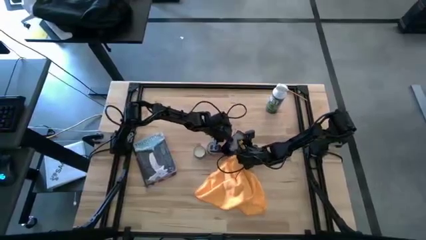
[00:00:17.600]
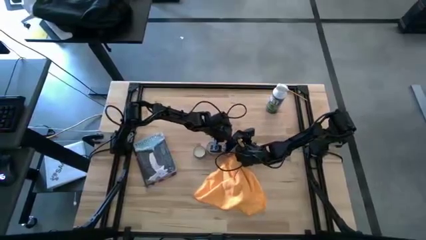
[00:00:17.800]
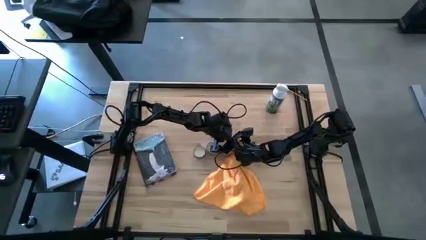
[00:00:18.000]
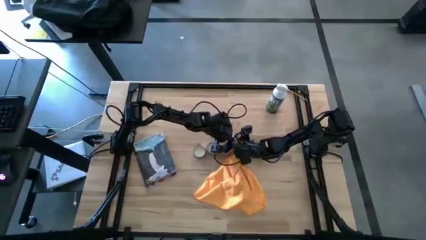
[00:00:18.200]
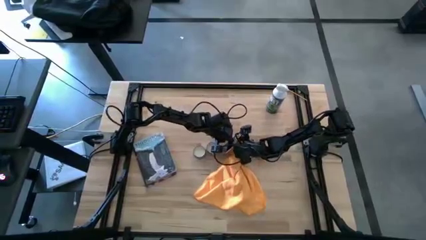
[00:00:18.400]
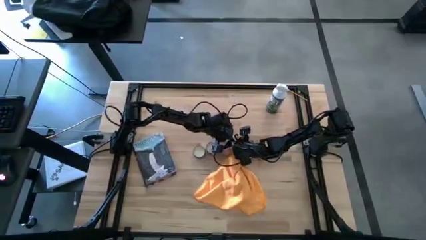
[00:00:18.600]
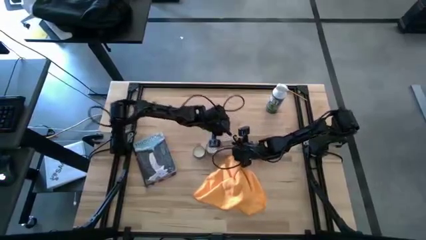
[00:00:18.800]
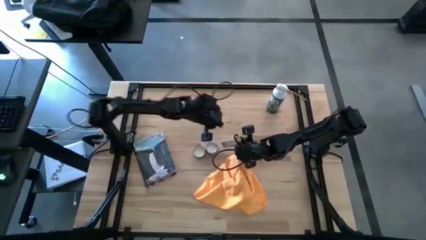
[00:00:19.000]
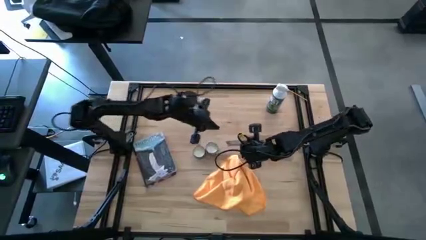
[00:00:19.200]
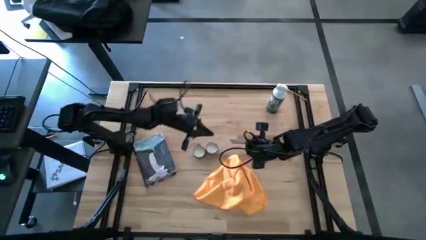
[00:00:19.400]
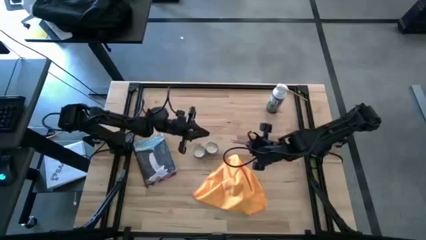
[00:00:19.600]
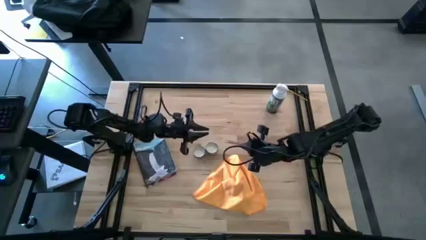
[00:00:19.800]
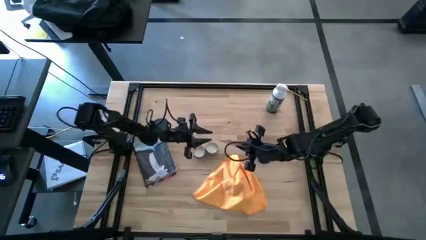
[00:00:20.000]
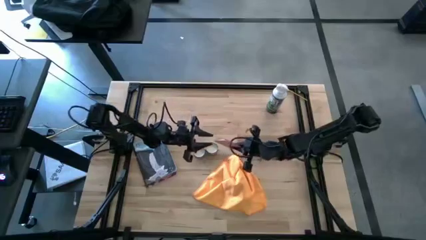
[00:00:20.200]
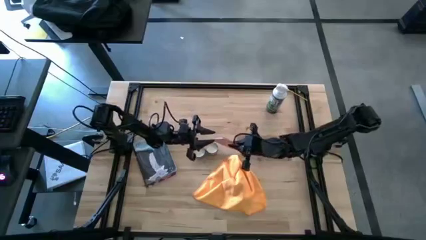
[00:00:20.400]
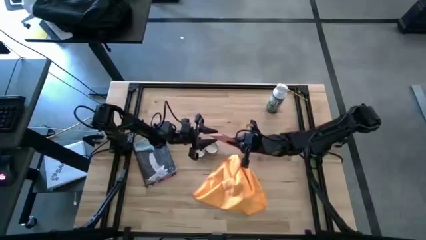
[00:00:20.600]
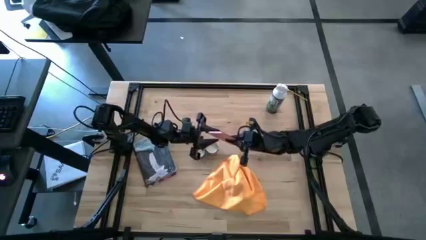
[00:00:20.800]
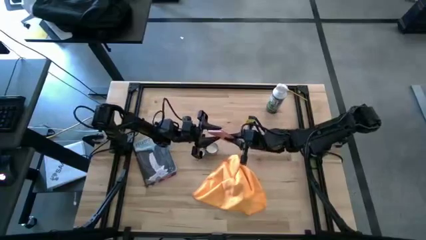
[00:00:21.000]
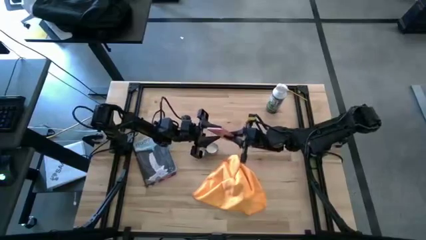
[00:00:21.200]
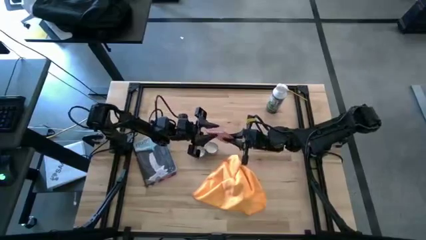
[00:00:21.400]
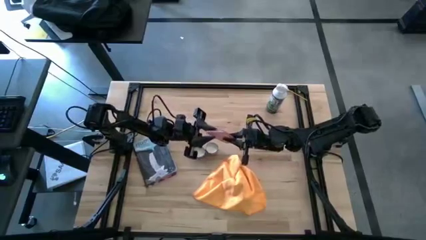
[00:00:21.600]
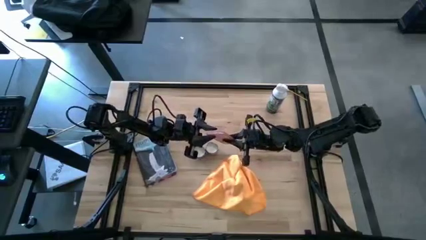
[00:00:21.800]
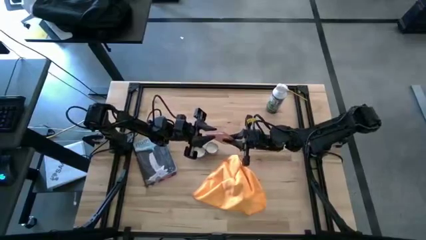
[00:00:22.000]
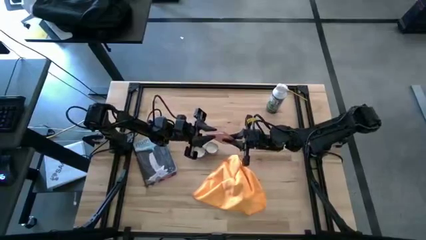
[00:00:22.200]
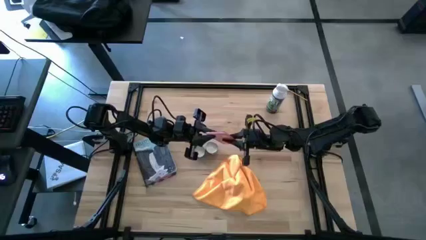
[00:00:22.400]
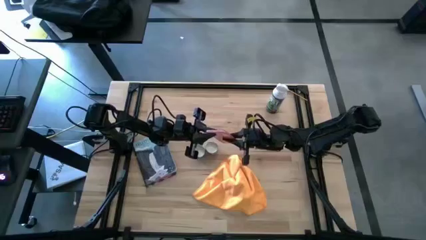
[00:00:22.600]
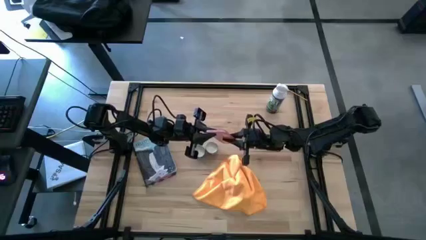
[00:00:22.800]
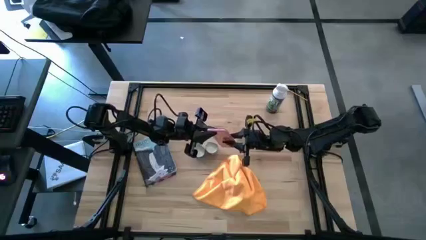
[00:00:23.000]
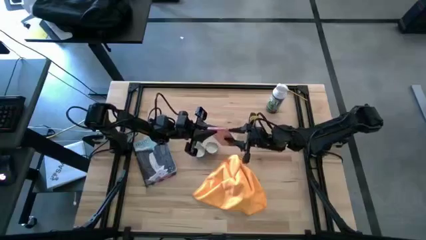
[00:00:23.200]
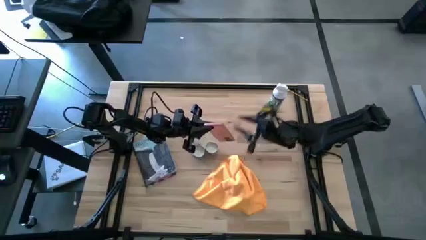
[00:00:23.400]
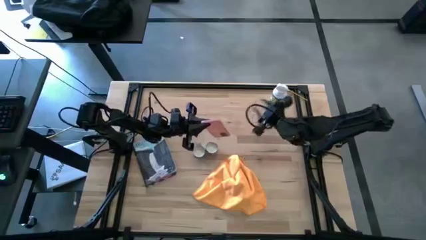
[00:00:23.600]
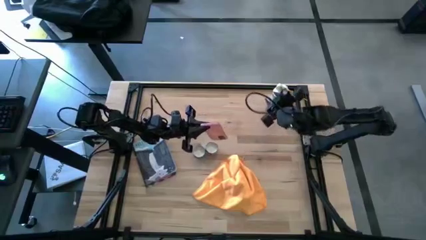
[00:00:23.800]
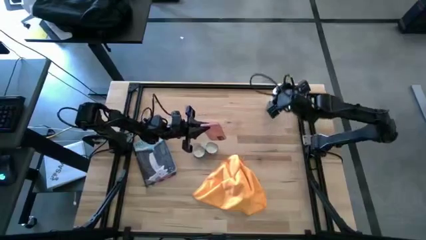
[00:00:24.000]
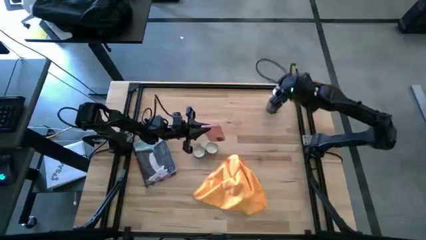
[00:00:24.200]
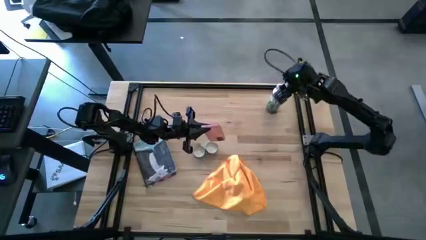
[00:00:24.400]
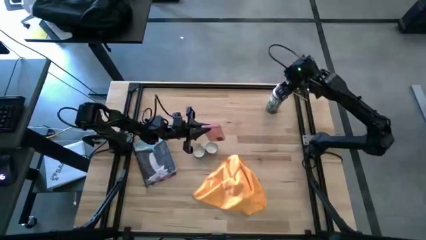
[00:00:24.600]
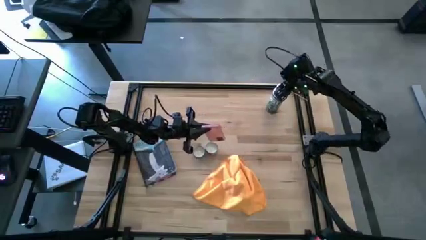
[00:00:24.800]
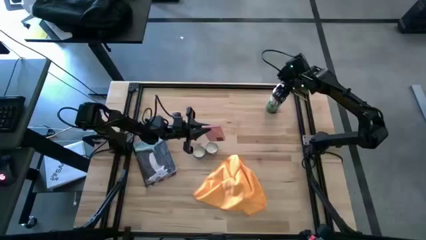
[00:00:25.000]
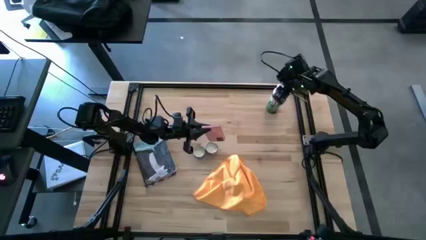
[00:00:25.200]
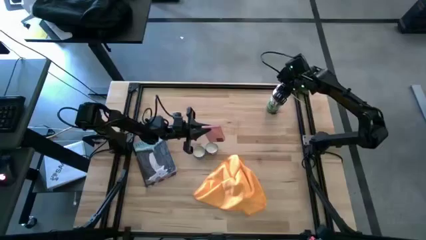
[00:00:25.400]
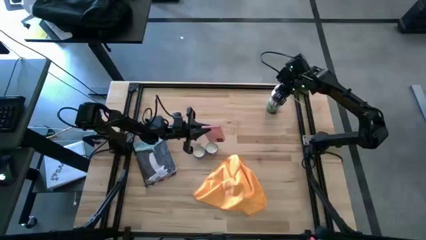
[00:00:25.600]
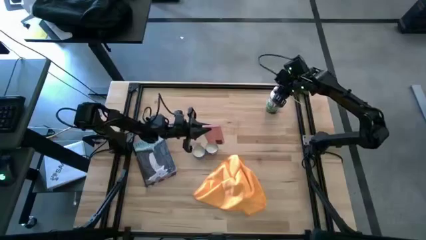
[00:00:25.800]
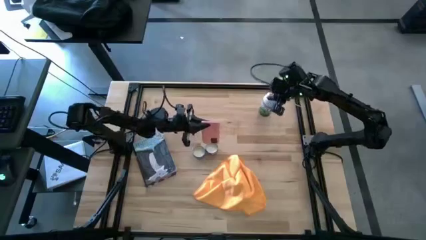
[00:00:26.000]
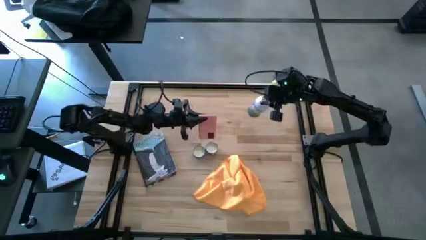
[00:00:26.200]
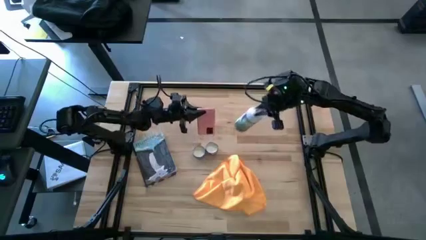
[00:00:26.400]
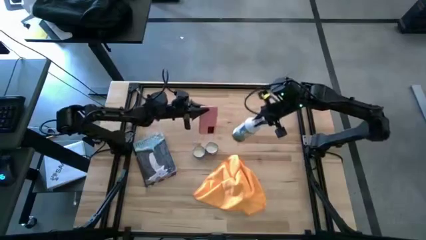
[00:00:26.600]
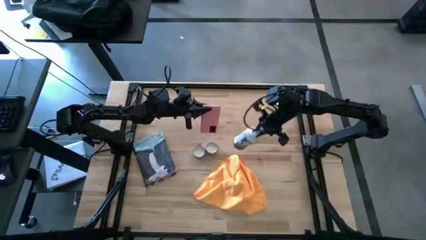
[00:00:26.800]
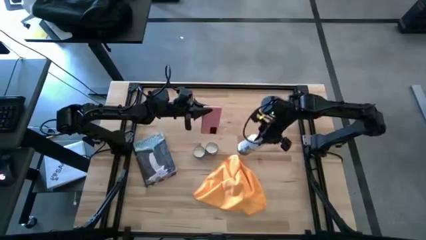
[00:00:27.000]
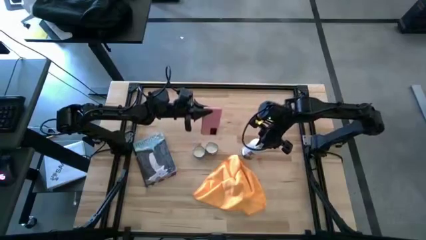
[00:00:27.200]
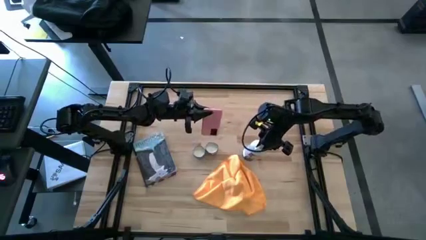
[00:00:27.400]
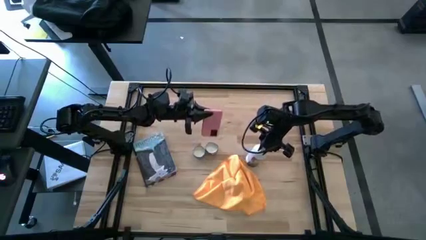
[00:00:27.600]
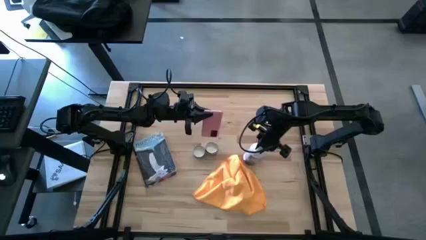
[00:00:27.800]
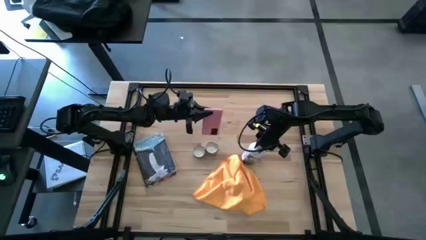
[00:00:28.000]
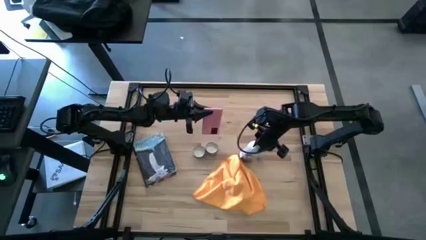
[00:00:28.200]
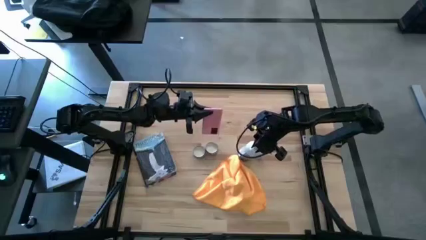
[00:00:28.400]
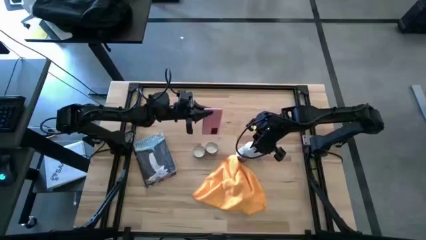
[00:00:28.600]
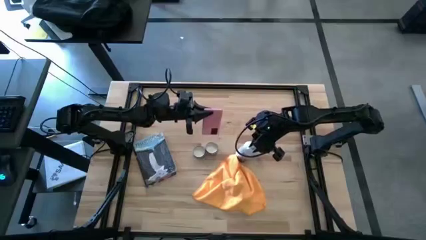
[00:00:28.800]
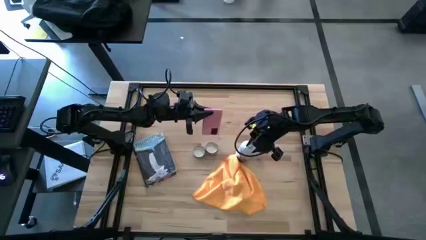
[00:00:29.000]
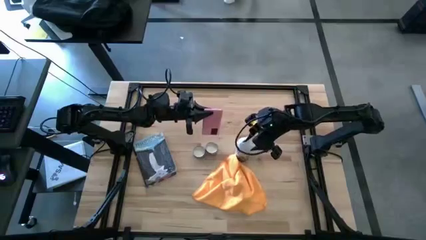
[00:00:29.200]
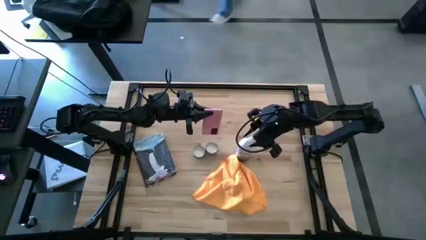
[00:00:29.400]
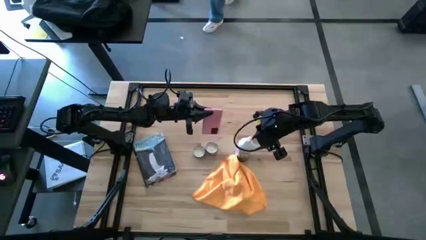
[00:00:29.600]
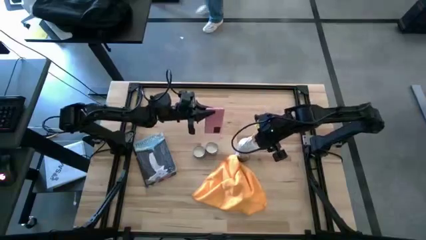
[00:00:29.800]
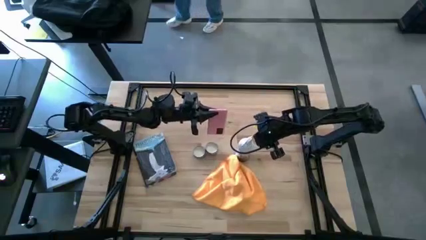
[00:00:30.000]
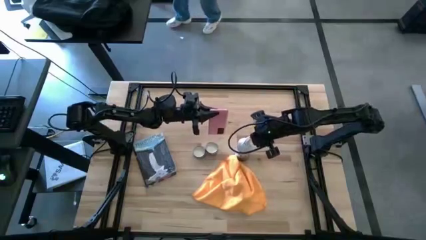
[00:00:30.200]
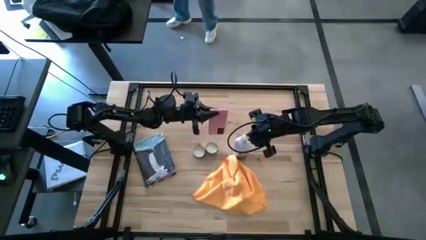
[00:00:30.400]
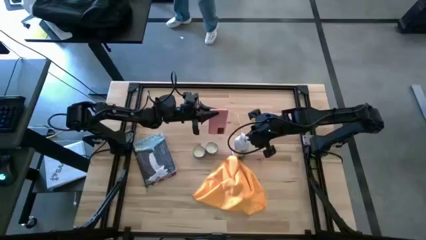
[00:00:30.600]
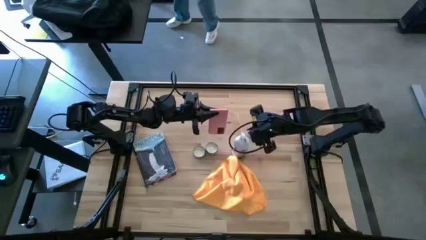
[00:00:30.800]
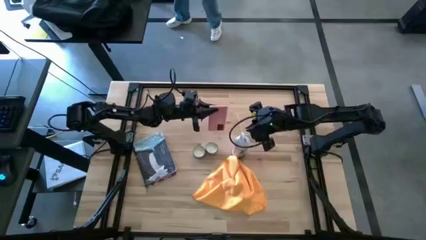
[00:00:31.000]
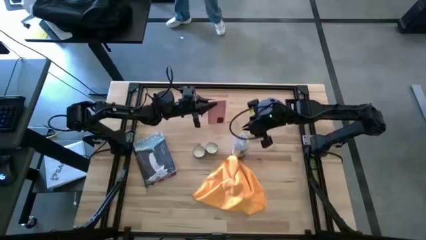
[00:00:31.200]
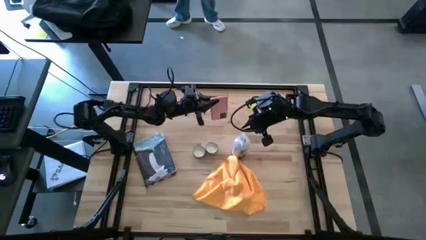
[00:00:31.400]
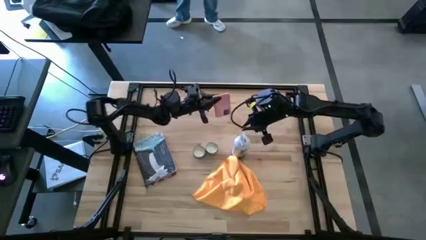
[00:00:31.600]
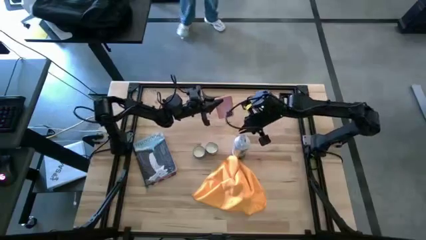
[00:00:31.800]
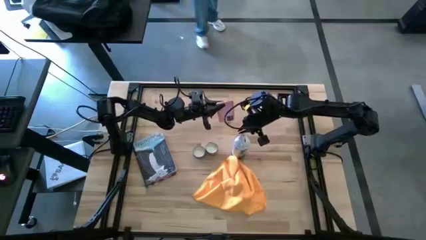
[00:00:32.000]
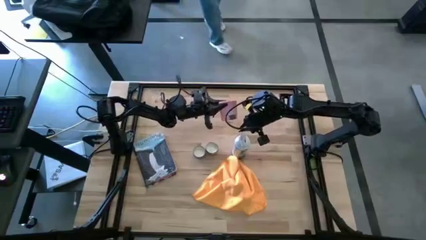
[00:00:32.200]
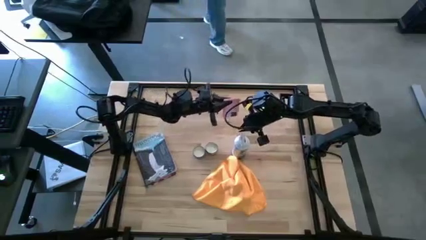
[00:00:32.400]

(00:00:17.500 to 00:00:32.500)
Task: Apply microfiber cloth
Spray the cellphone
